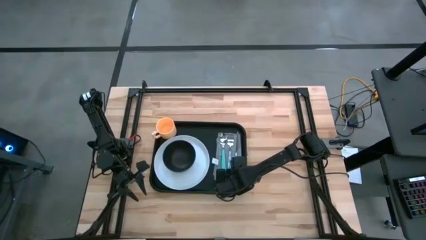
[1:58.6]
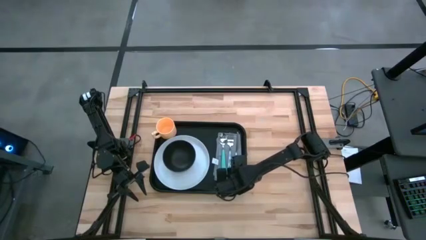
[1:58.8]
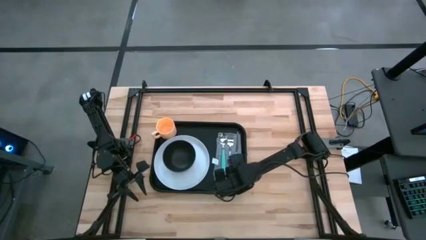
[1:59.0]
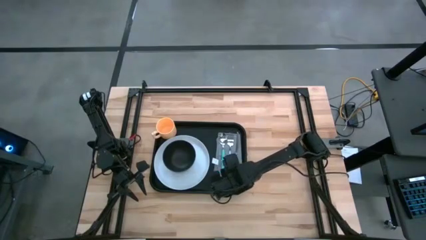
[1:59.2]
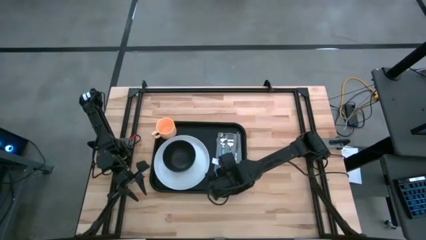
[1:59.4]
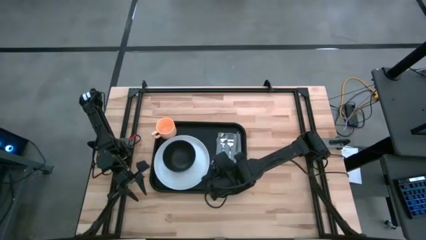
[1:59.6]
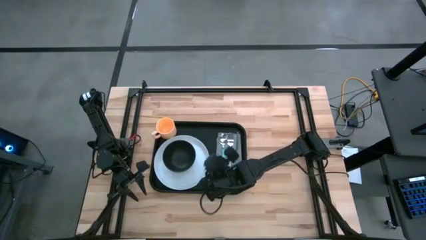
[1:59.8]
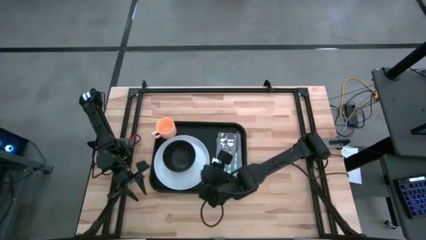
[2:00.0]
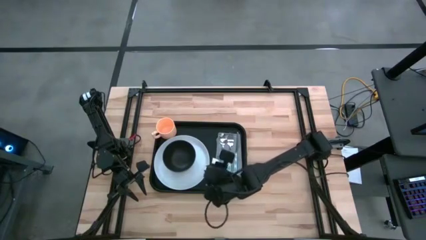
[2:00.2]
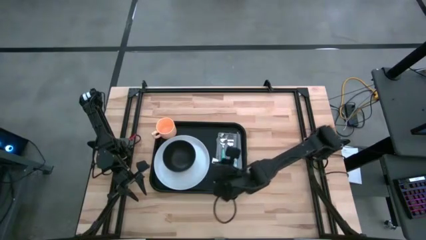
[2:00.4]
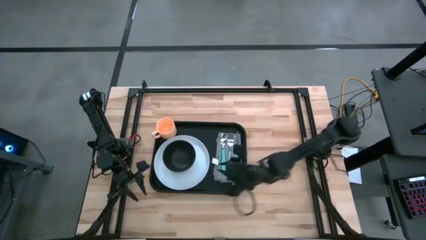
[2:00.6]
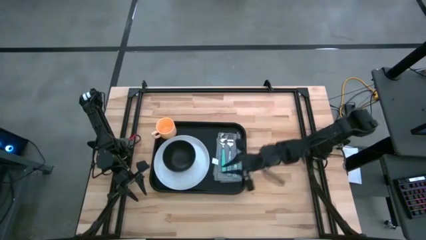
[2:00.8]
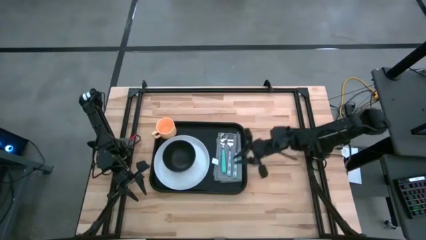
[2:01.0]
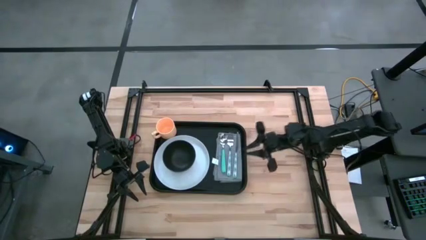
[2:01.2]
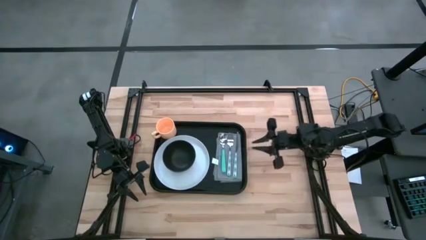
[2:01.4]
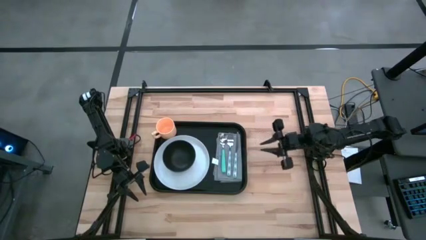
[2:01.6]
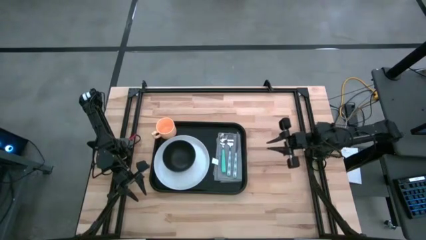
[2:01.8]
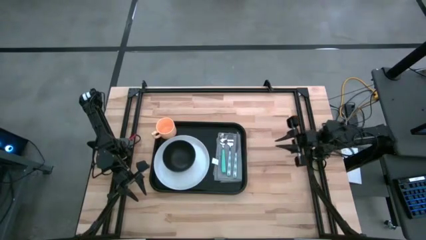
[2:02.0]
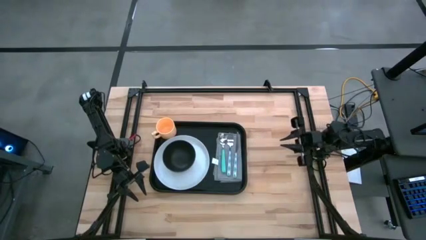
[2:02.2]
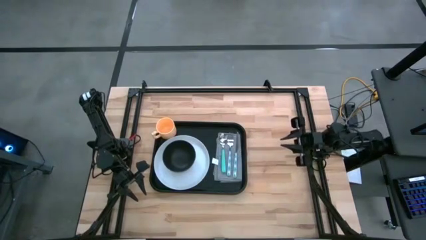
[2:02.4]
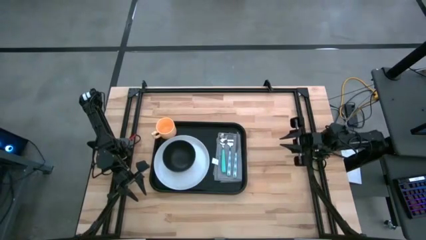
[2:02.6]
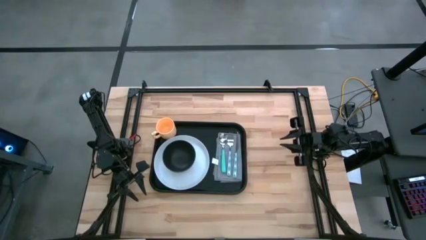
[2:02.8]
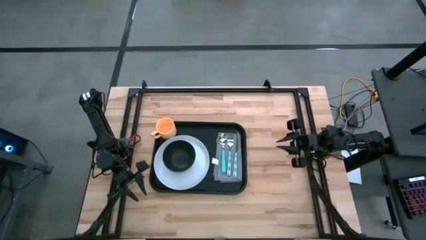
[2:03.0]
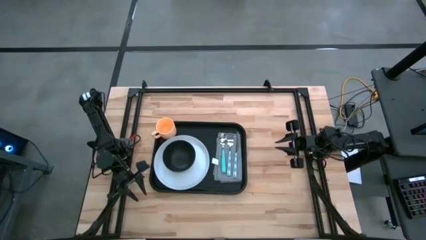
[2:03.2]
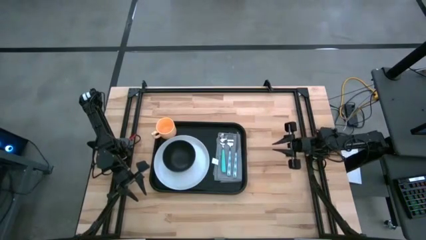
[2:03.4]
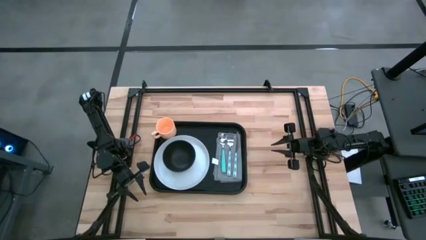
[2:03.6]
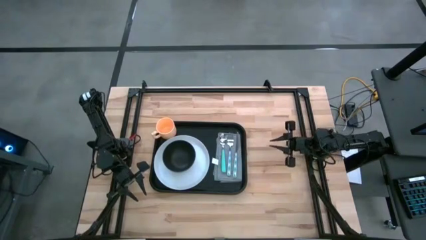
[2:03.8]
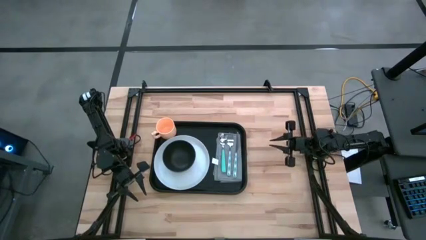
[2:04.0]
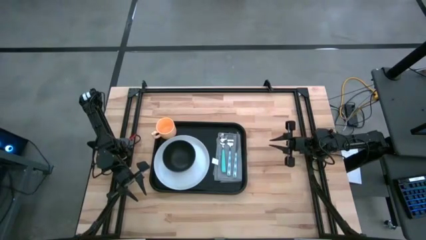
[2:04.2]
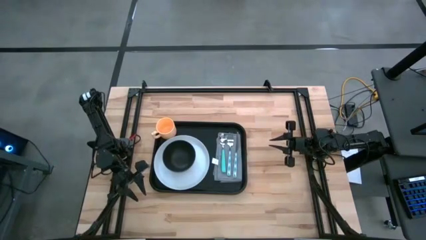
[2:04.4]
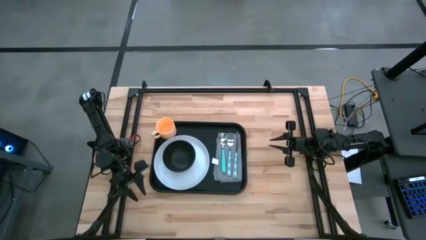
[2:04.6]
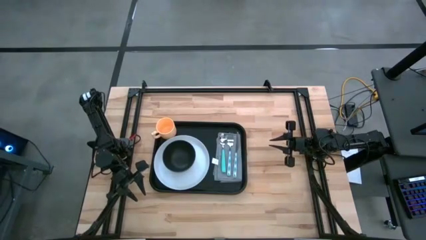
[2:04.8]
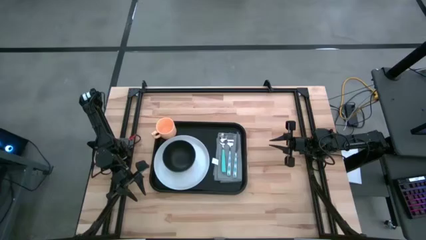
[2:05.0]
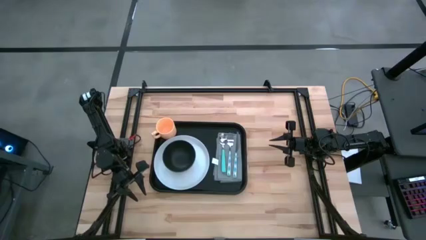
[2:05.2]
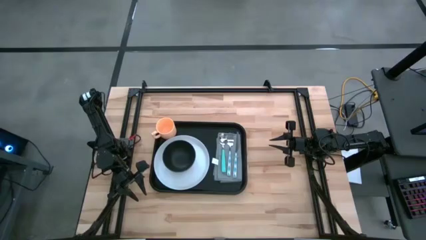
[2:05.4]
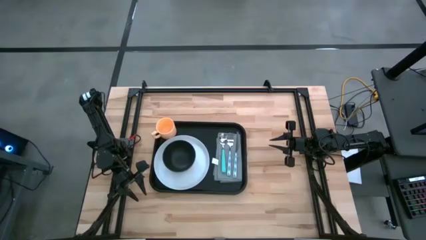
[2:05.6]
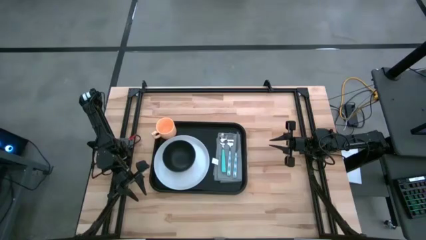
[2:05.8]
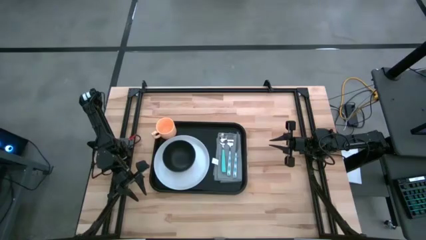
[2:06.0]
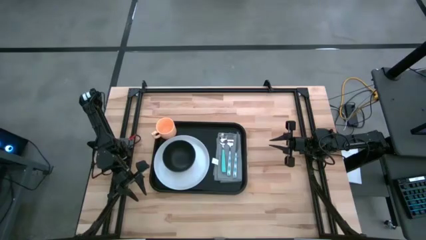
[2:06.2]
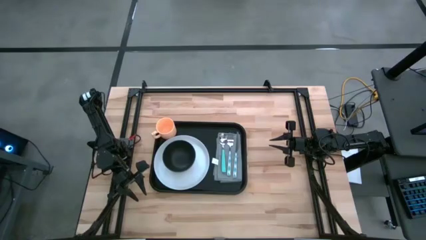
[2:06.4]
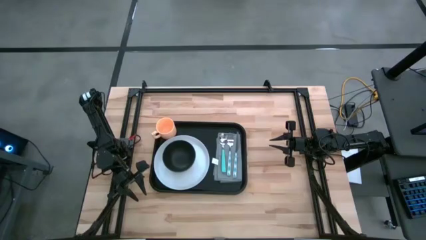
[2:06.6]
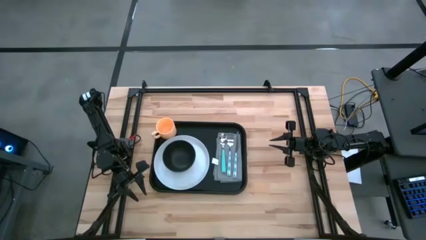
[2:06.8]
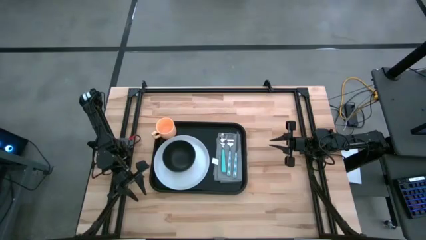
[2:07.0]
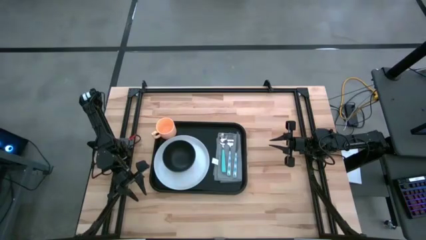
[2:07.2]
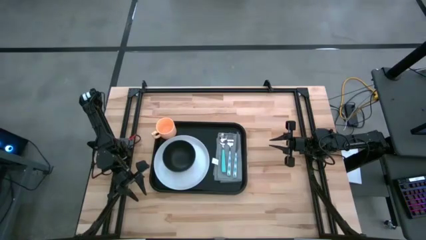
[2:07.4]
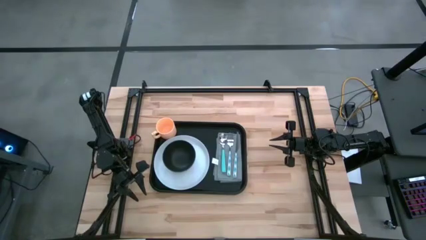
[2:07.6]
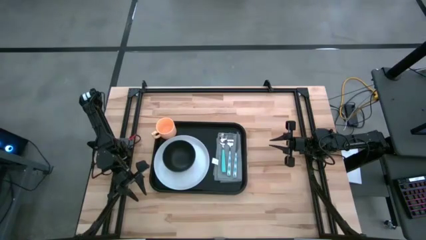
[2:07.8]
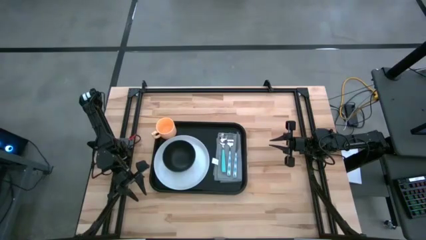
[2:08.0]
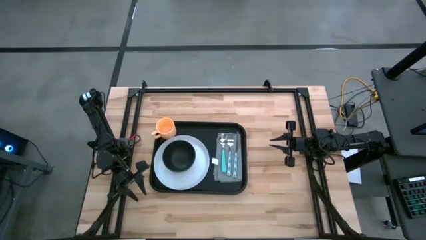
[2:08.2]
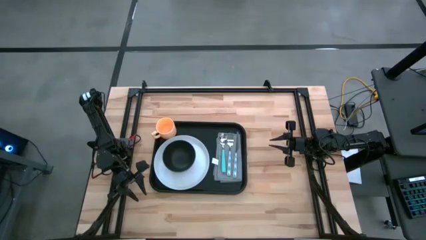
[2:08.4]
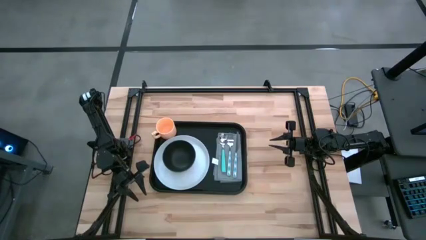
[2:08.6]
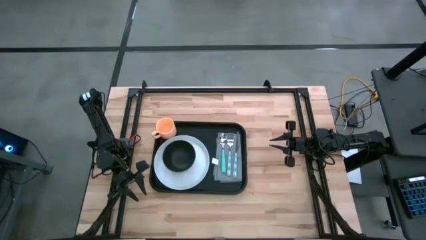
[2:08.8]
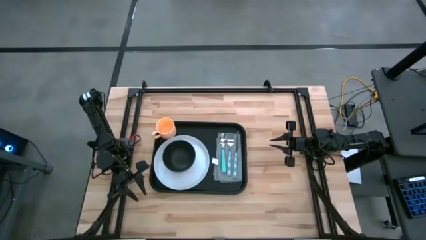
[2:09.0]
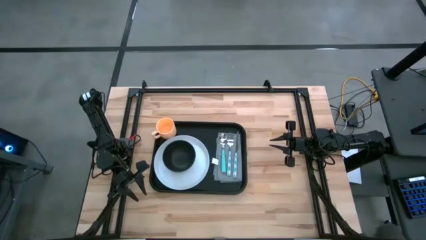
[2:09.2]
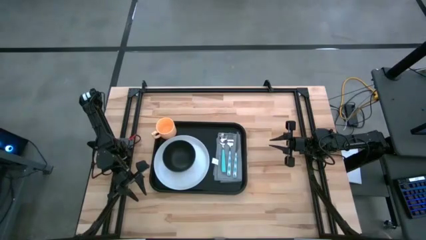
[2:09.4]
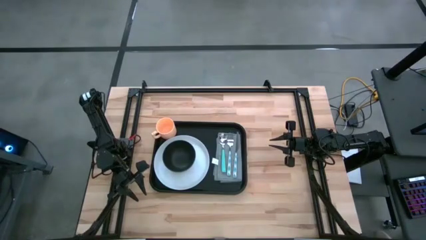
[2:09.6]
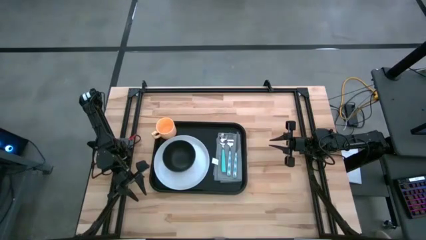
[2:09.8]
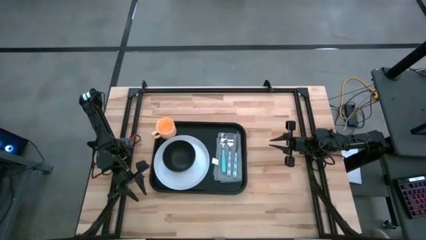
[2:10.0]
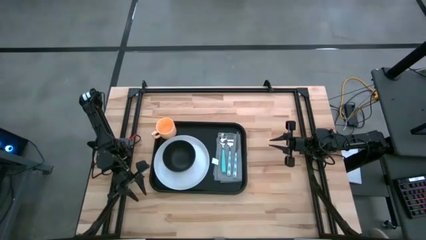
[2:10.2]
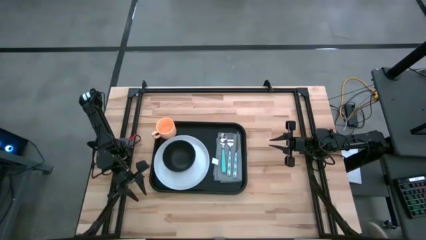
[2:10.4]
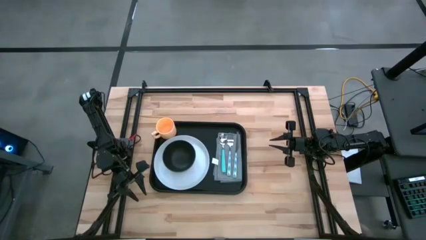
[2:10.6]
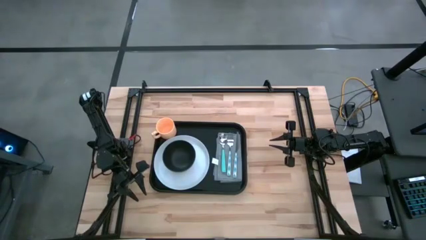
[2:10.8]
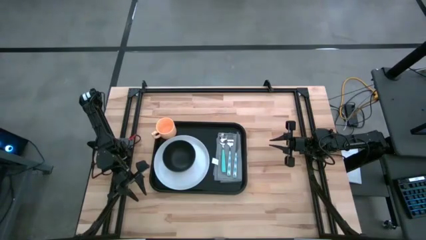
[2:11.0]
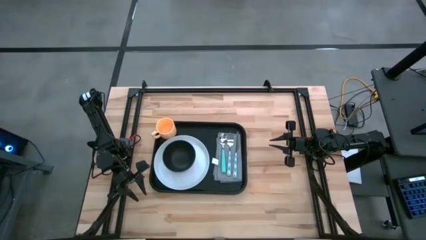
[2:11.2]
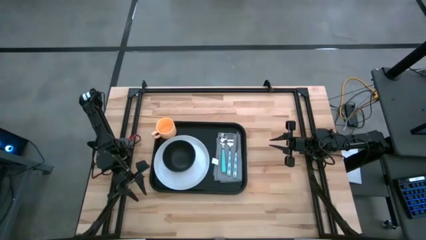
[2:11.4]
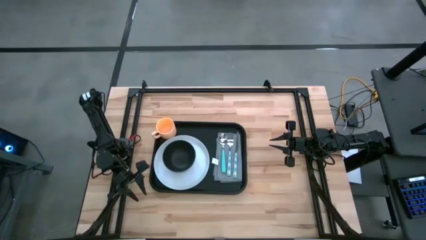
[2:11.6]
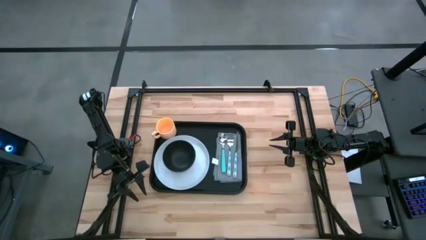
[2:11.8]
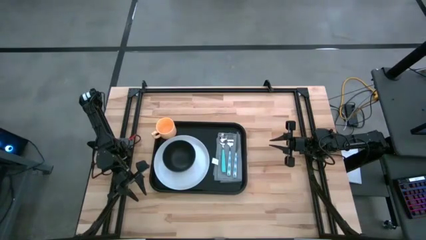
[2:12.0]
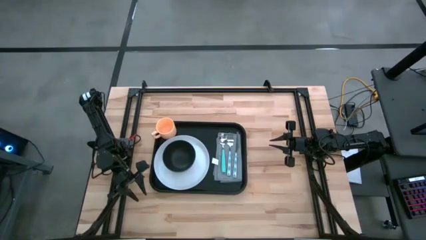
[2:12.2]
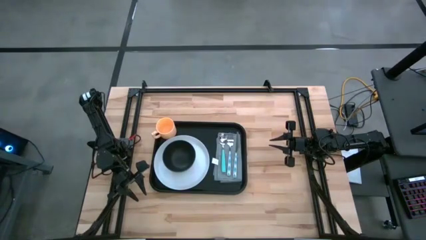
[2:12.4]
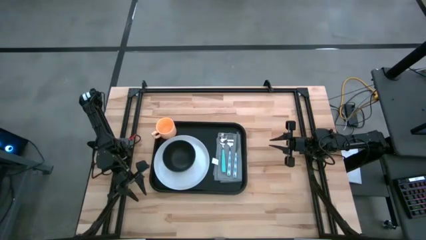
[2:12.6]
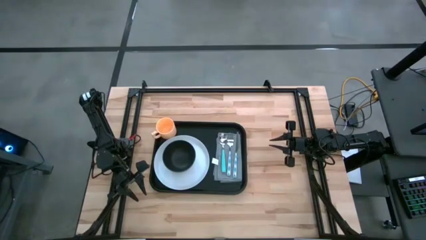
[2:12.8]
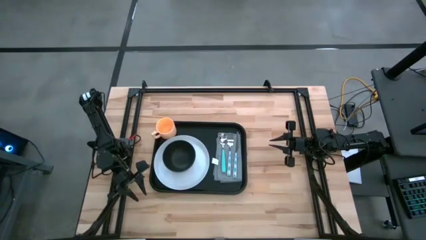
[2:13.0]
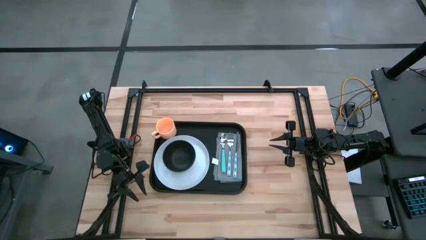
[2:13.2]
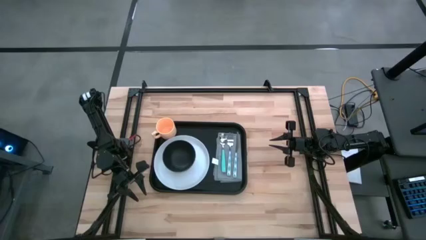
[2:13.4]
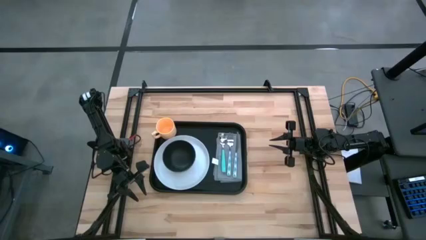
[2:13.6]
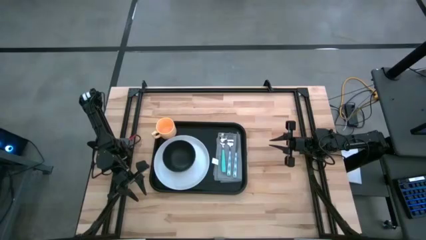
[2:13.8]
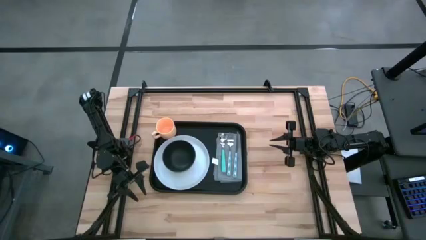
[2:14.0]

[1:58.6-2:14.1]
Task: Set up tray
Return to Home Position
